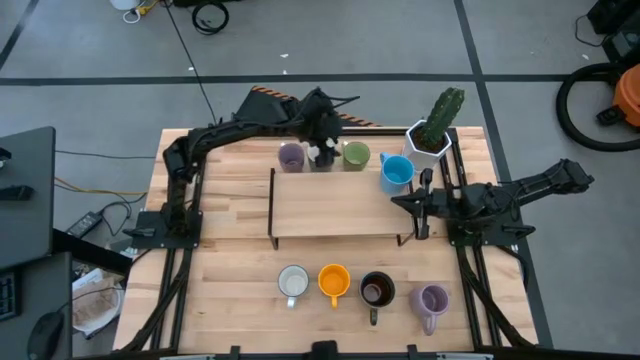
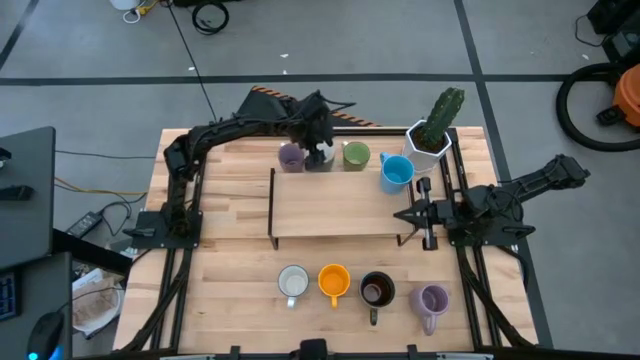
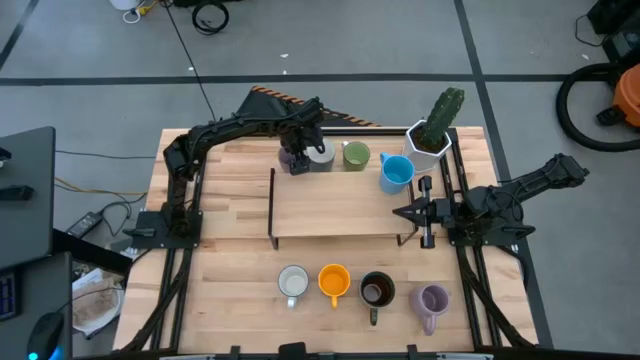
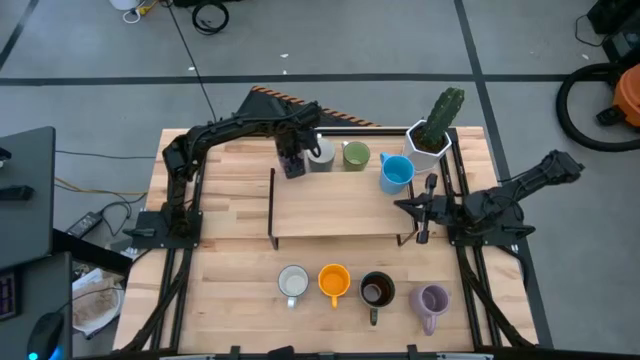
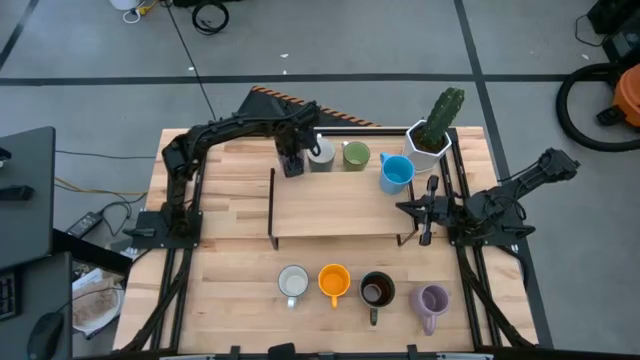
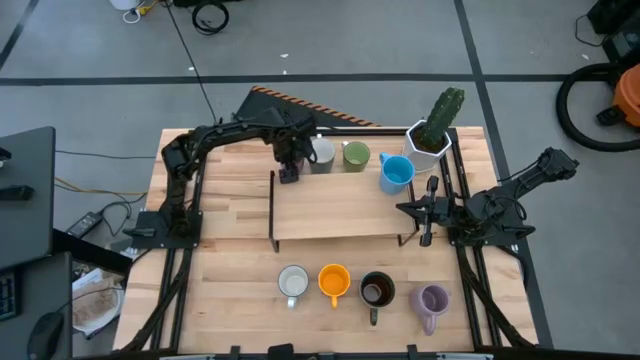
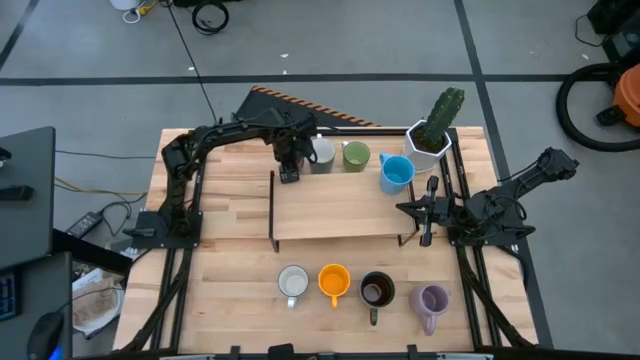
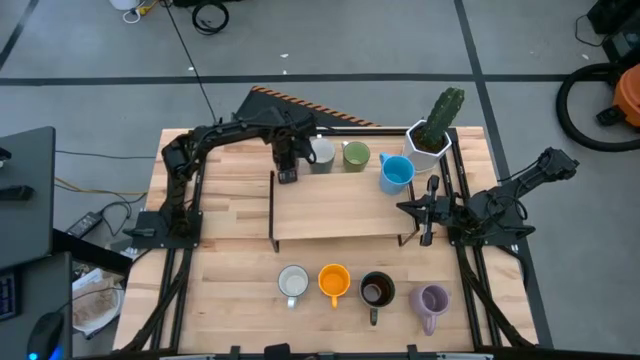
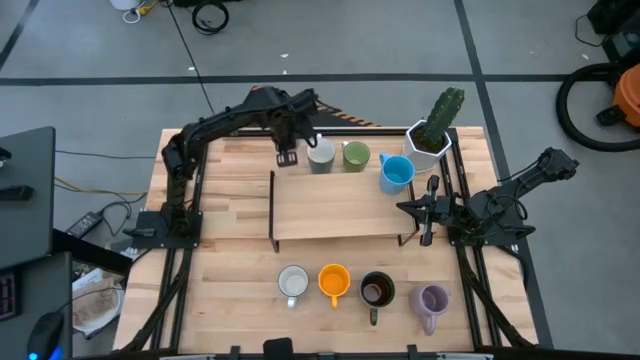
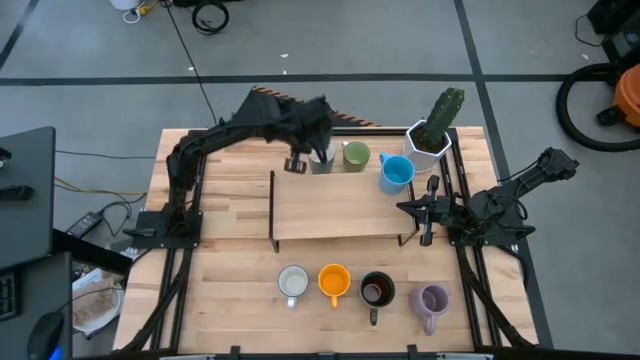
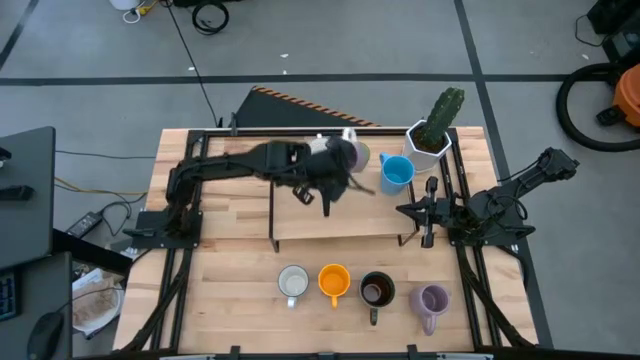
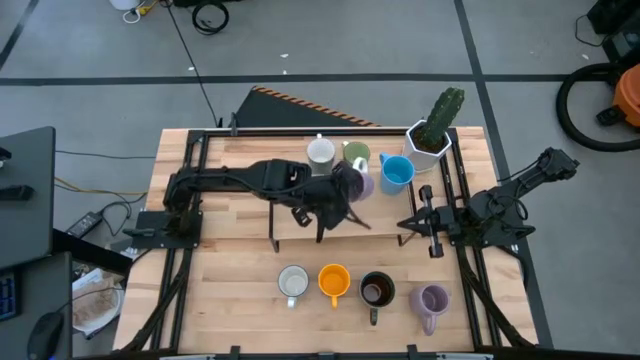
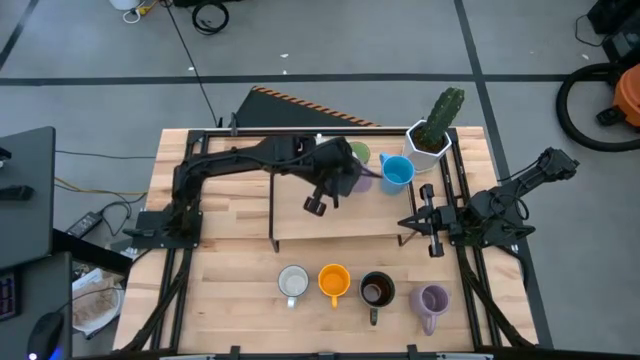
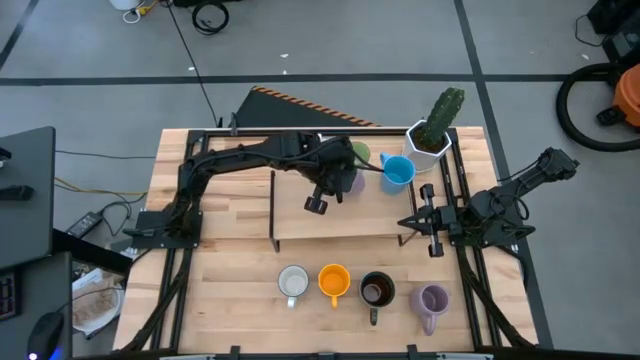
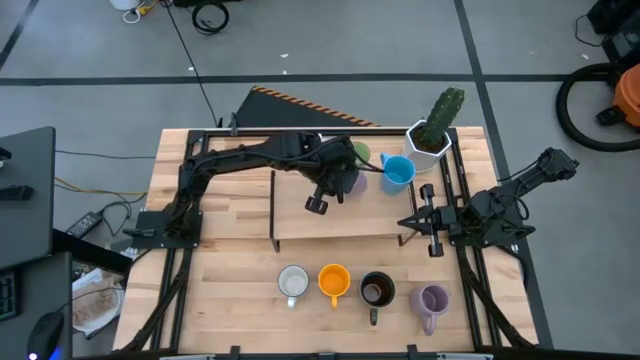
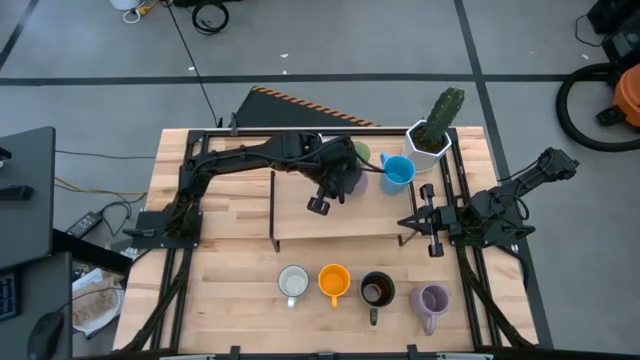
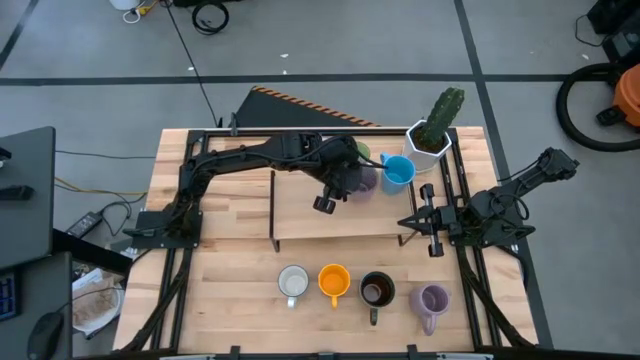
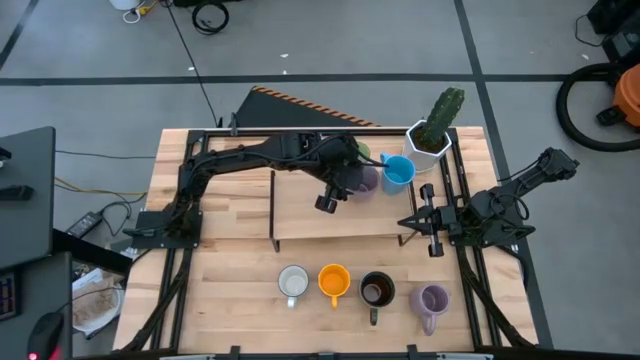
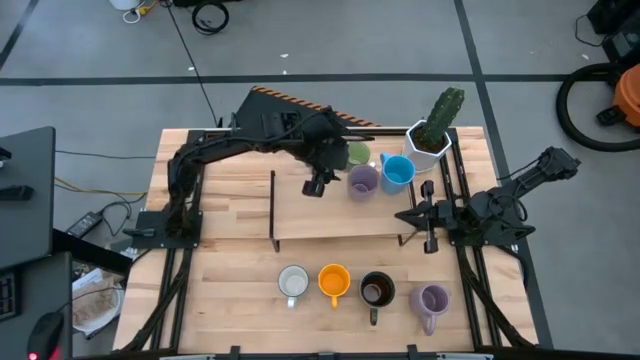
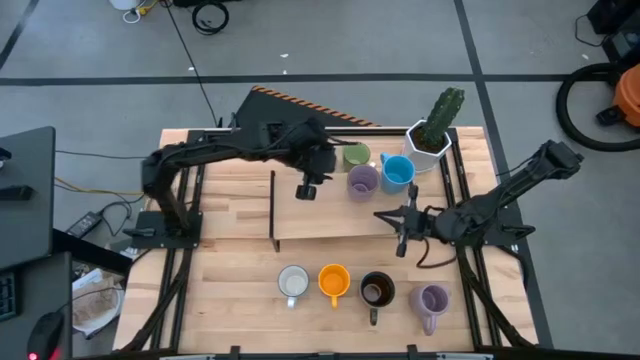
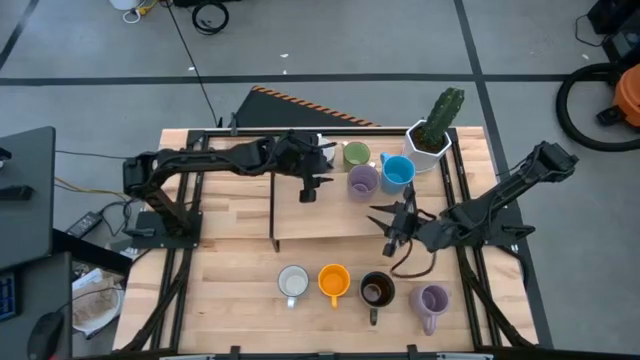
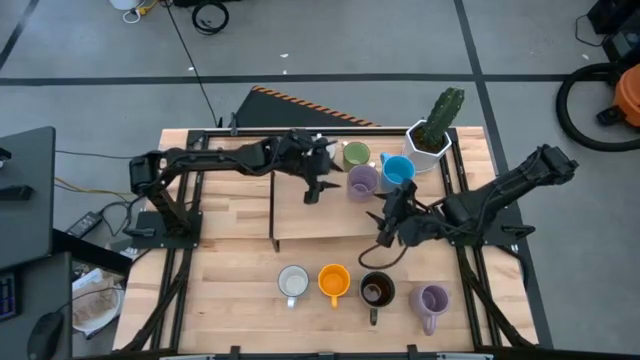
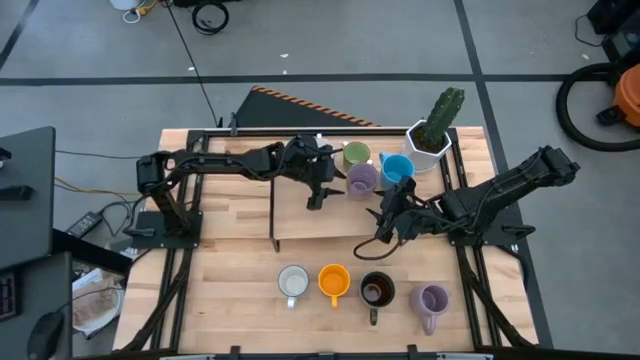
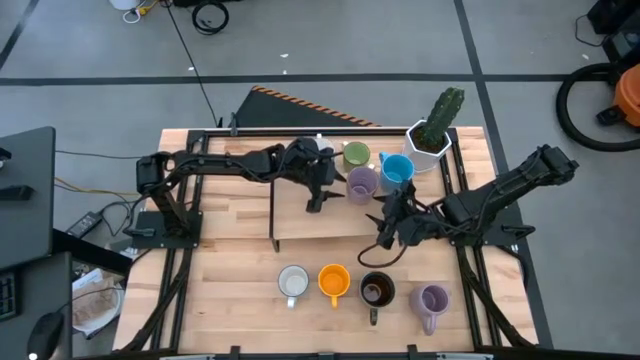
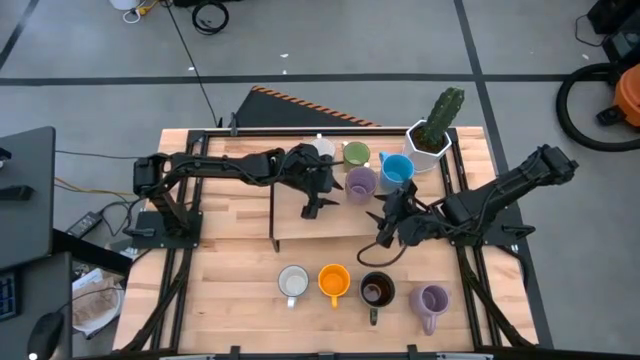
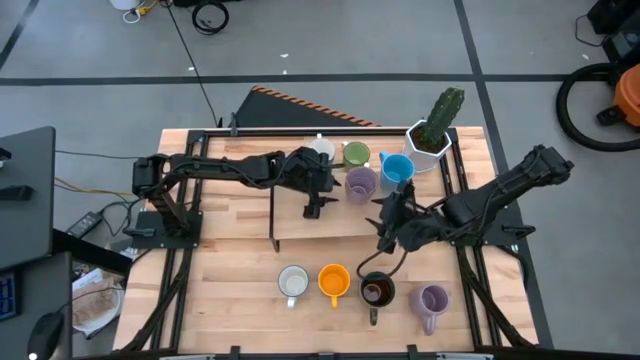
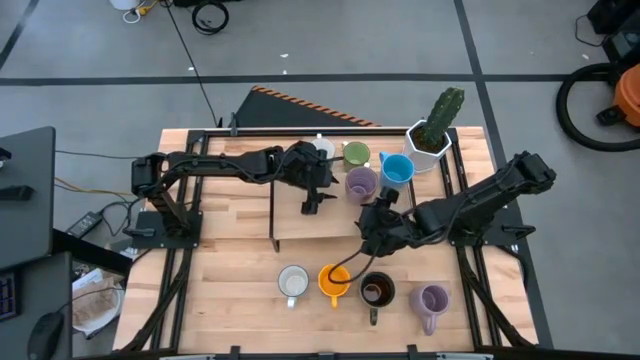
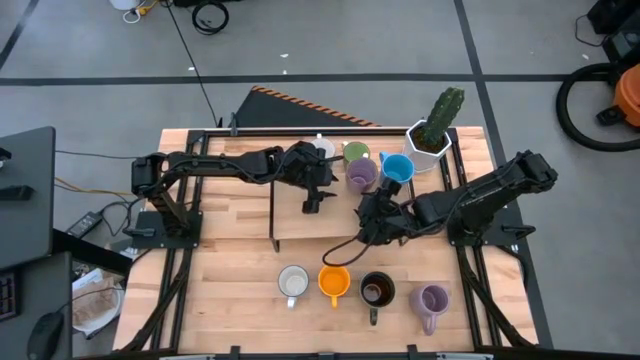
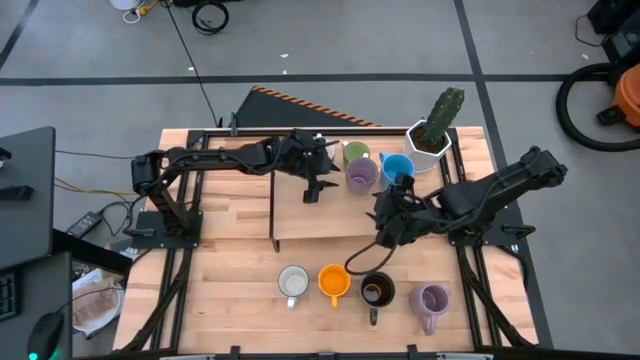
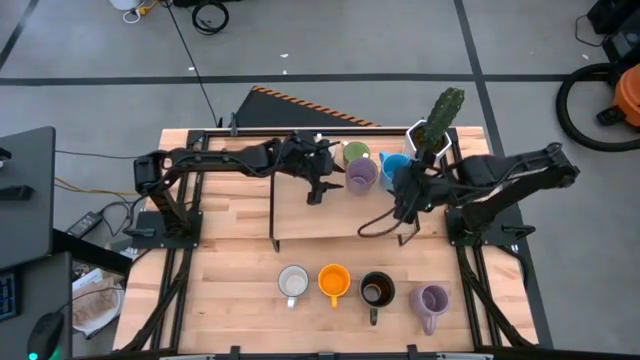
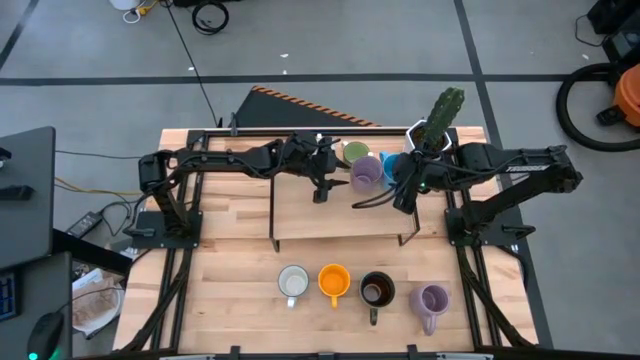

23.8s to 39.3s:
Task: Place coffee mugs
Put the purple mug on the shelf

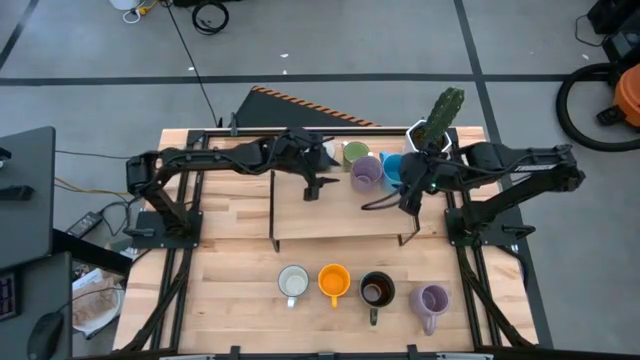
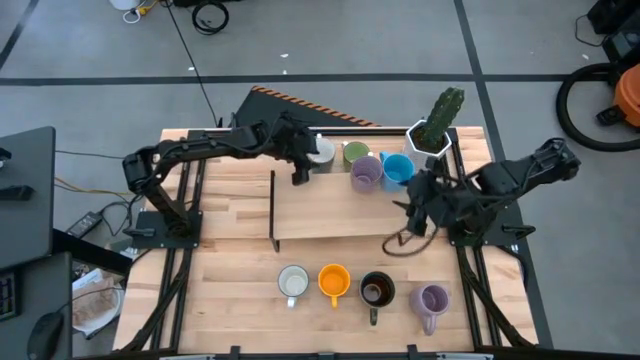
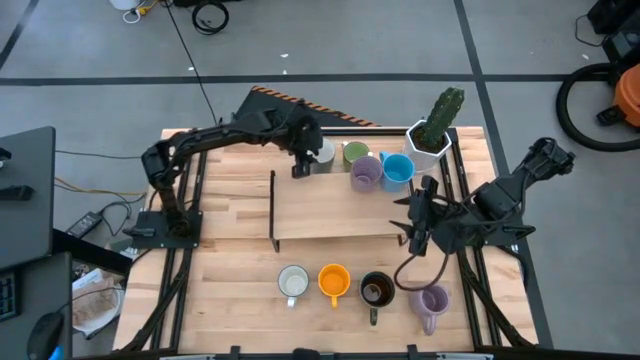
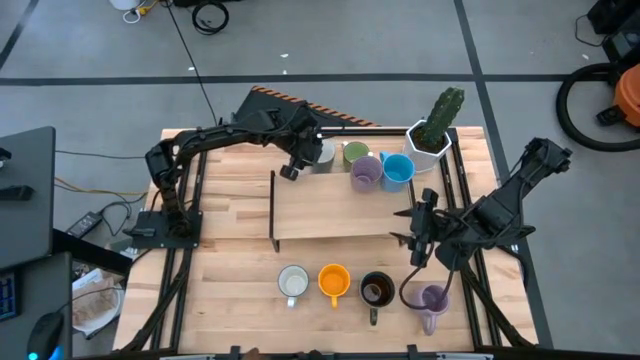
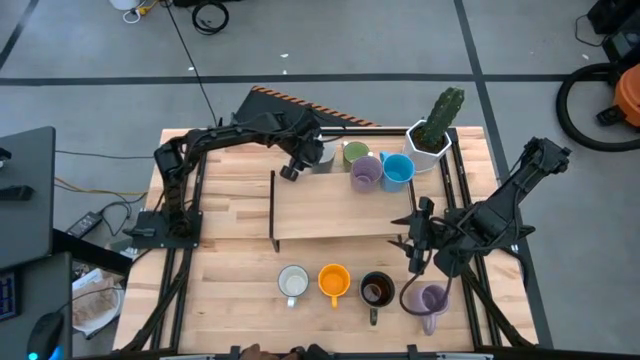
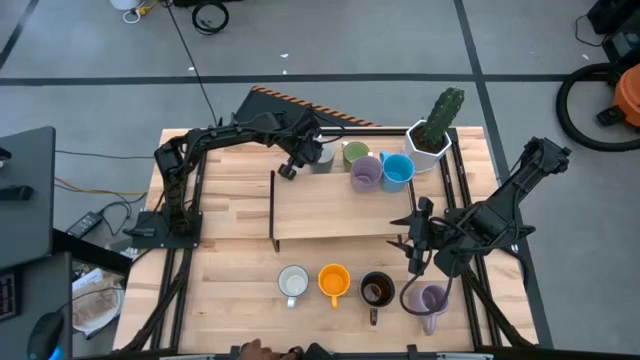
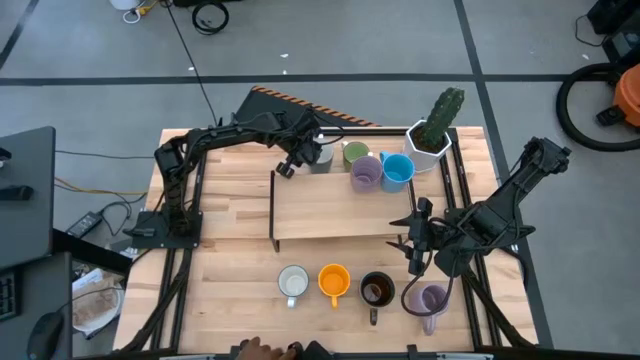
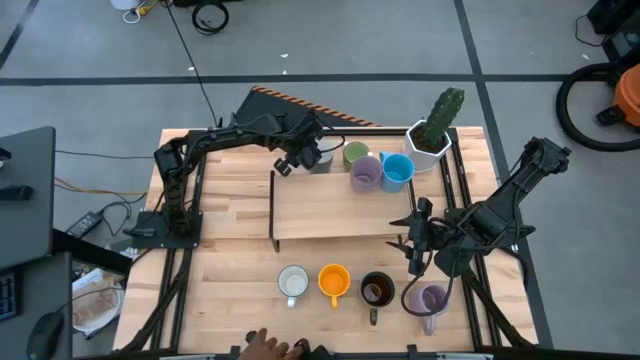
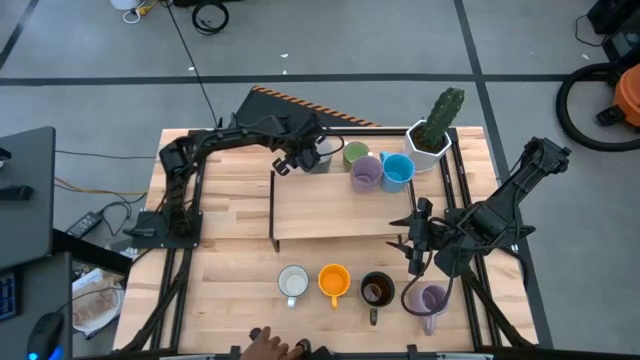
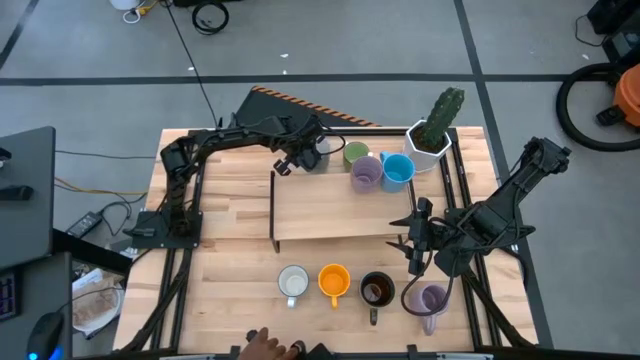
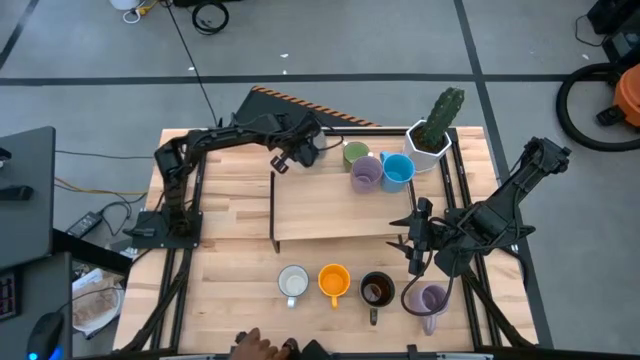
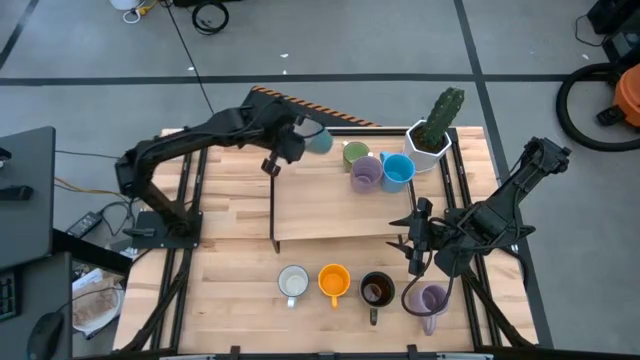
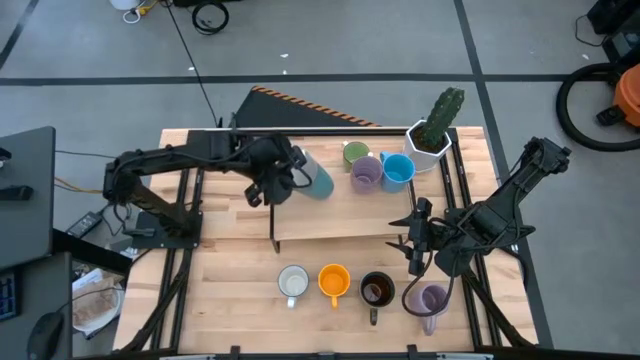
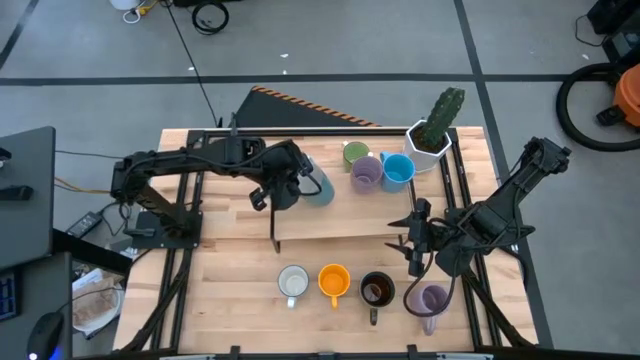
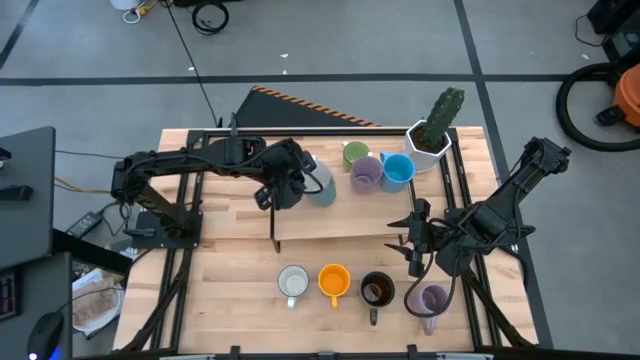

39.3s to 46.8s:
Put the blue mug on the shelf
